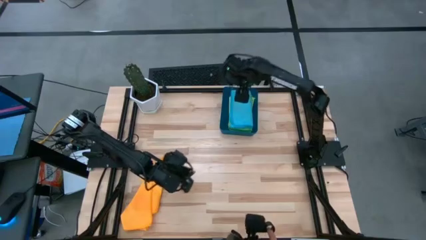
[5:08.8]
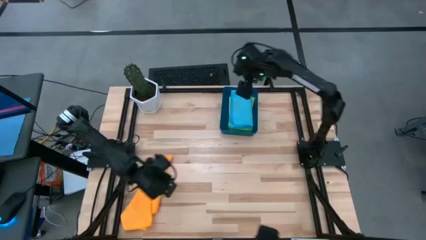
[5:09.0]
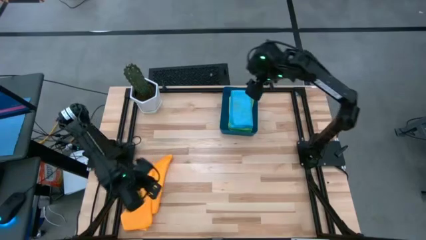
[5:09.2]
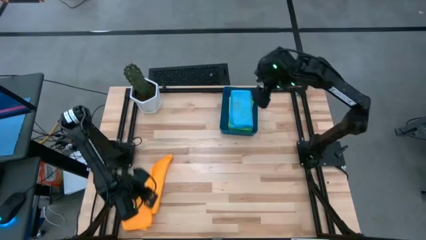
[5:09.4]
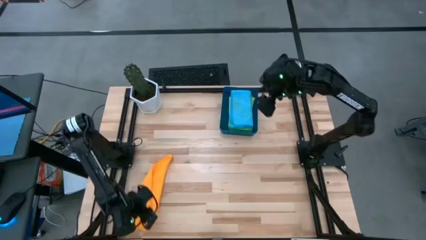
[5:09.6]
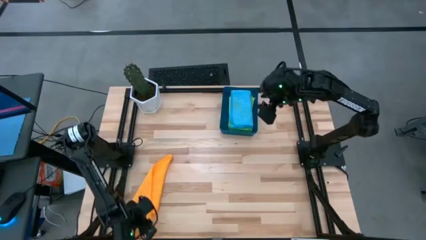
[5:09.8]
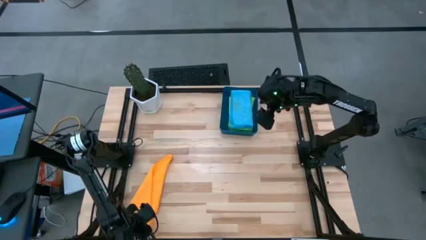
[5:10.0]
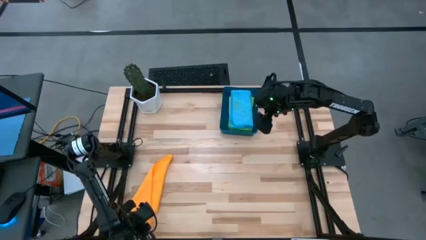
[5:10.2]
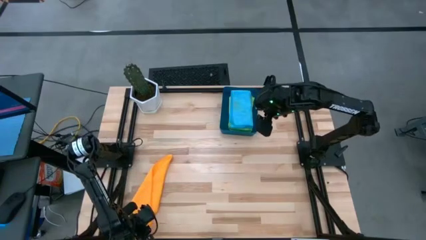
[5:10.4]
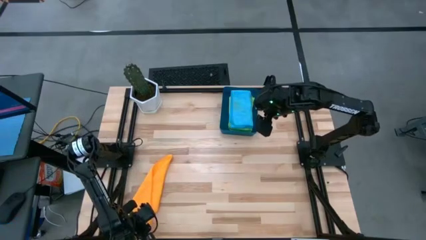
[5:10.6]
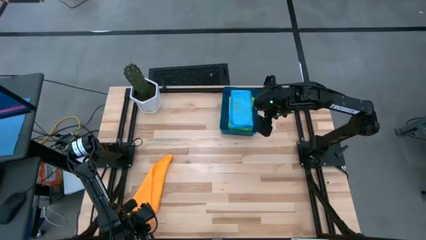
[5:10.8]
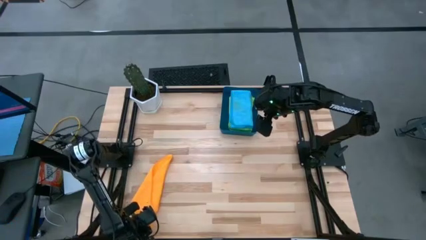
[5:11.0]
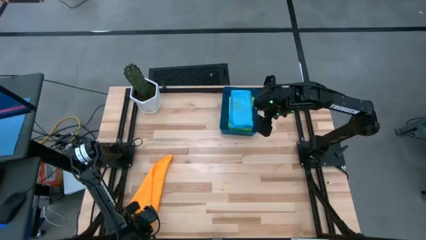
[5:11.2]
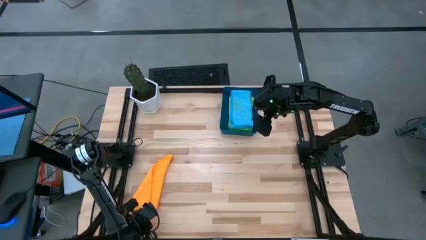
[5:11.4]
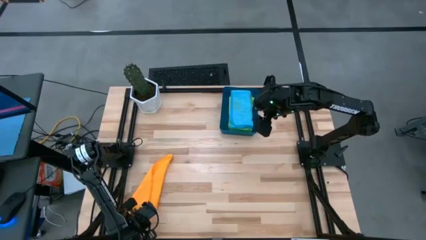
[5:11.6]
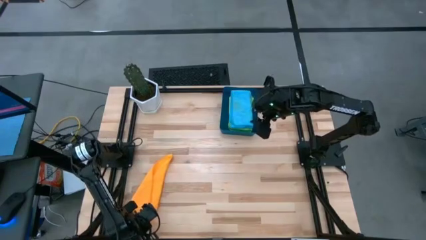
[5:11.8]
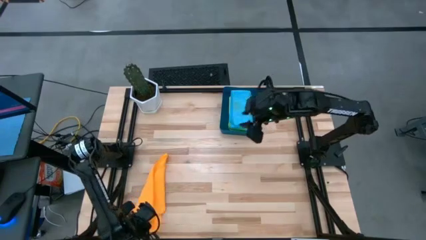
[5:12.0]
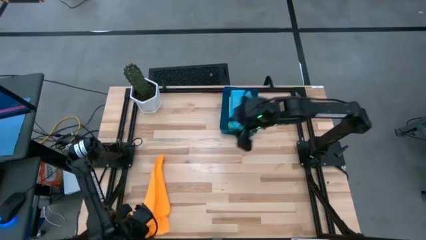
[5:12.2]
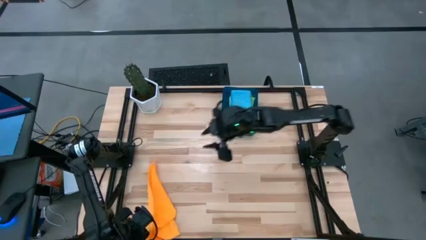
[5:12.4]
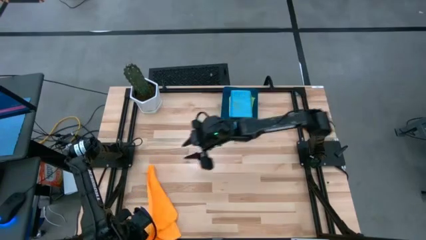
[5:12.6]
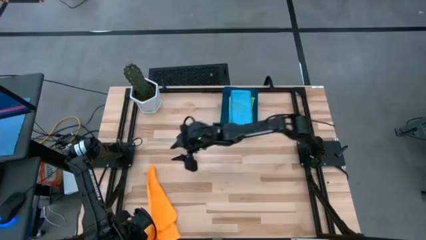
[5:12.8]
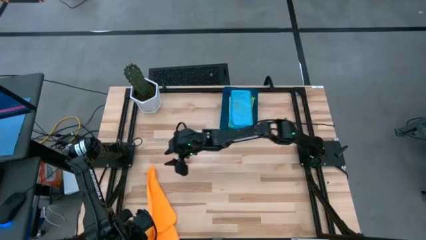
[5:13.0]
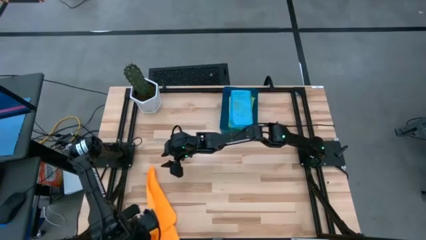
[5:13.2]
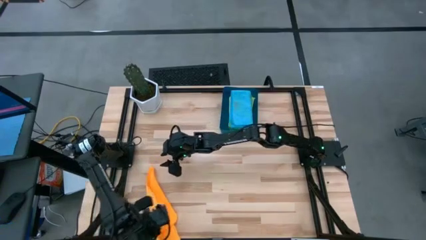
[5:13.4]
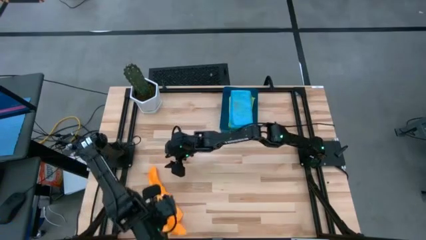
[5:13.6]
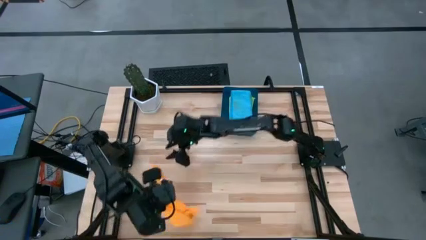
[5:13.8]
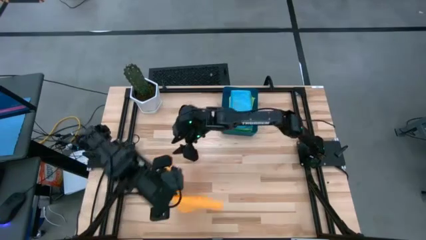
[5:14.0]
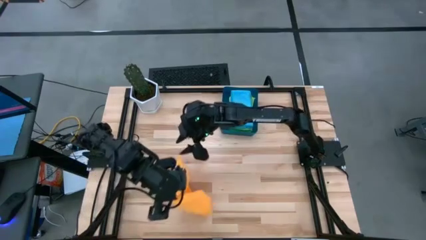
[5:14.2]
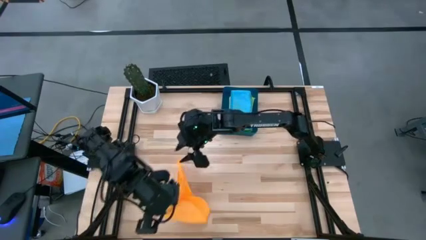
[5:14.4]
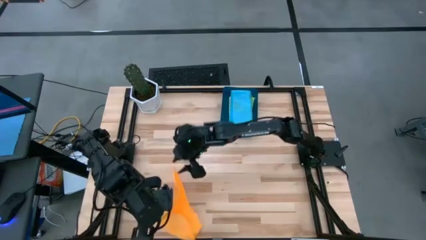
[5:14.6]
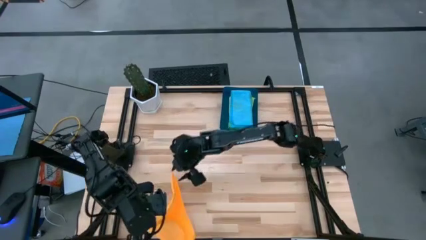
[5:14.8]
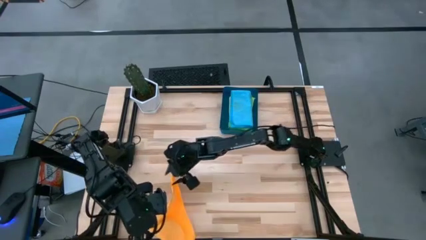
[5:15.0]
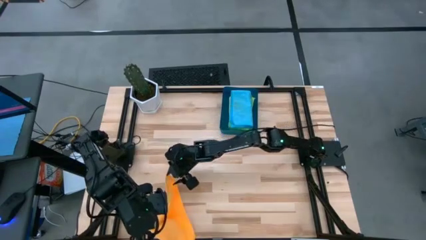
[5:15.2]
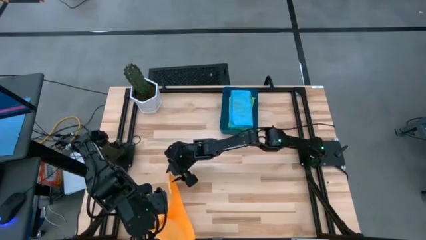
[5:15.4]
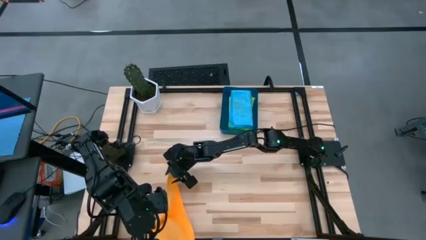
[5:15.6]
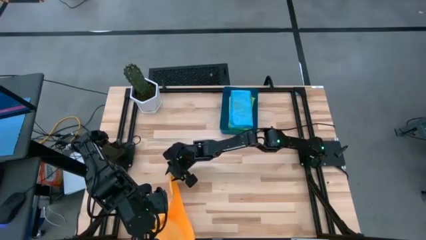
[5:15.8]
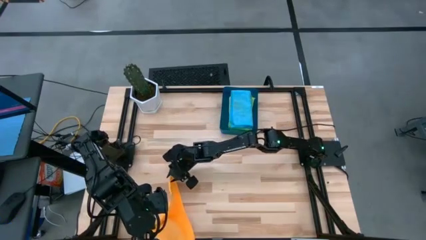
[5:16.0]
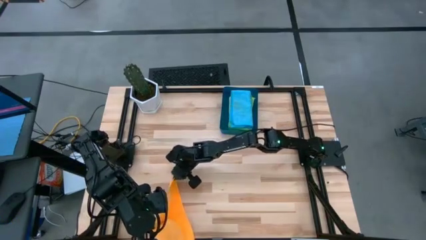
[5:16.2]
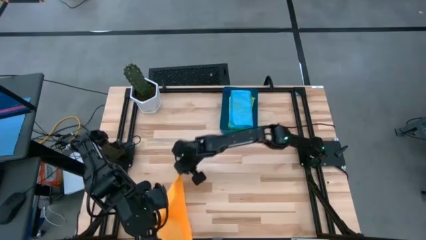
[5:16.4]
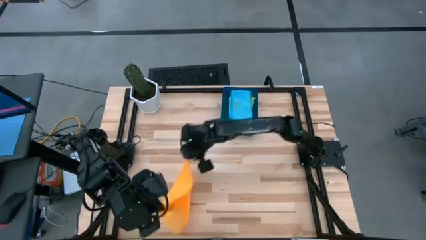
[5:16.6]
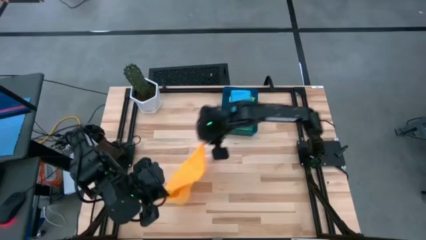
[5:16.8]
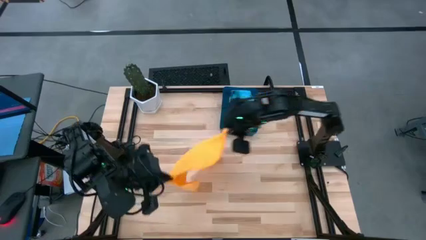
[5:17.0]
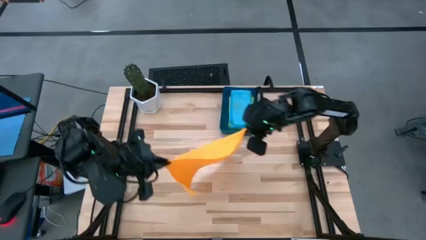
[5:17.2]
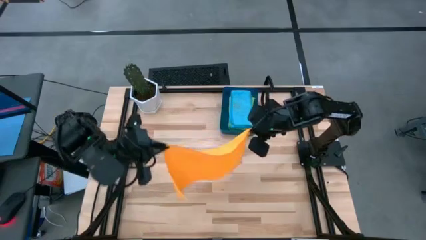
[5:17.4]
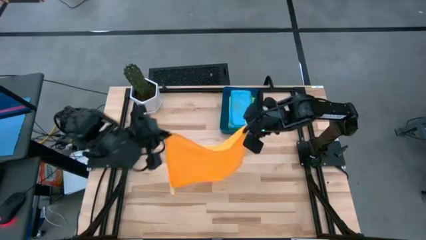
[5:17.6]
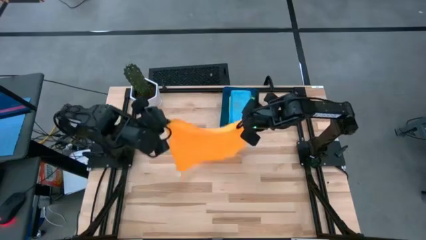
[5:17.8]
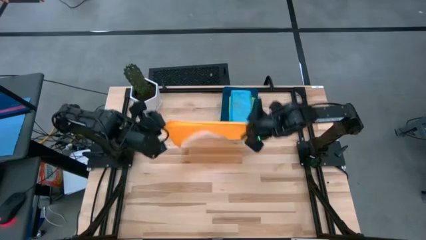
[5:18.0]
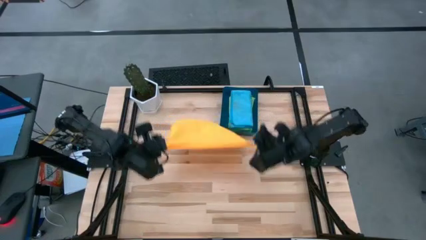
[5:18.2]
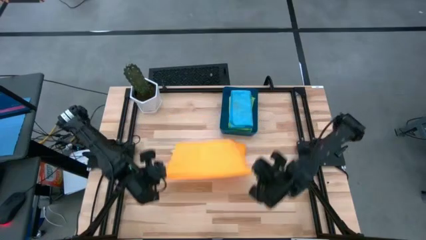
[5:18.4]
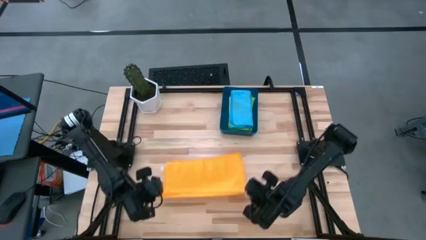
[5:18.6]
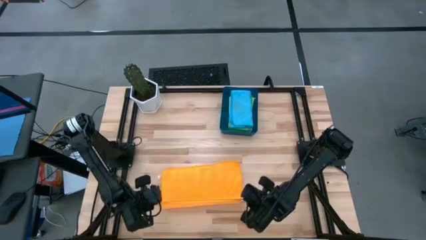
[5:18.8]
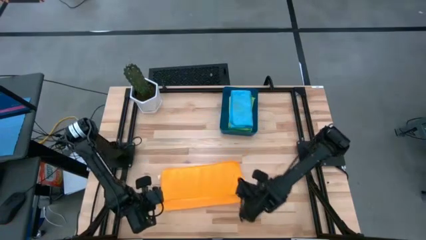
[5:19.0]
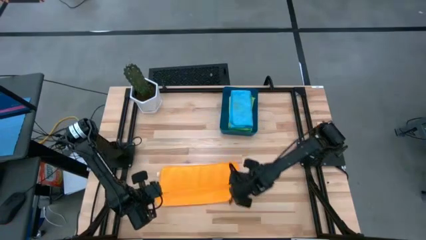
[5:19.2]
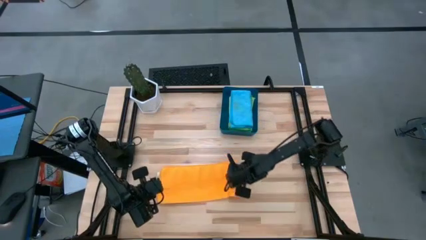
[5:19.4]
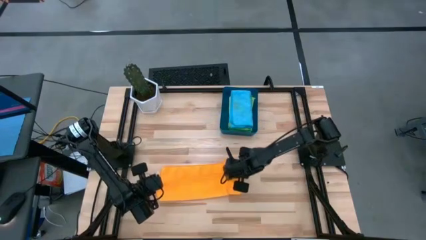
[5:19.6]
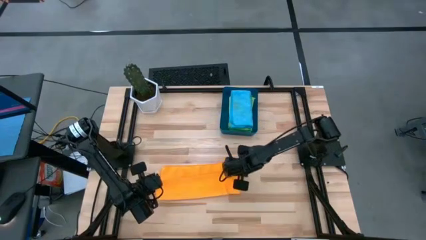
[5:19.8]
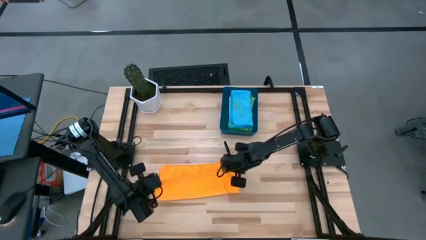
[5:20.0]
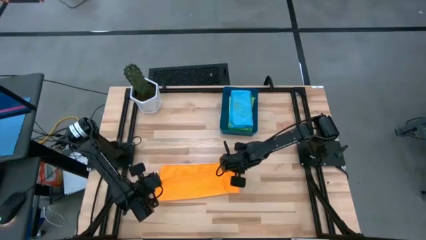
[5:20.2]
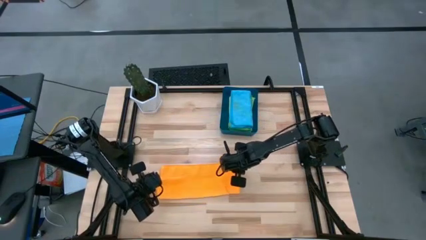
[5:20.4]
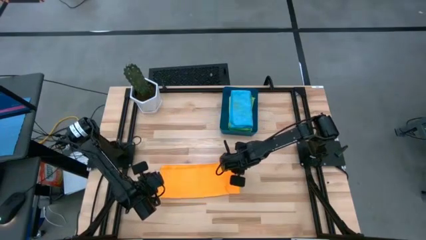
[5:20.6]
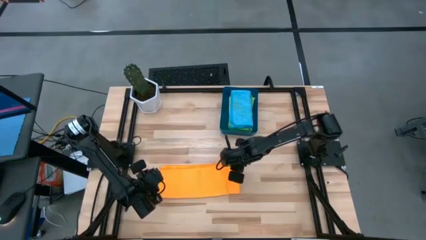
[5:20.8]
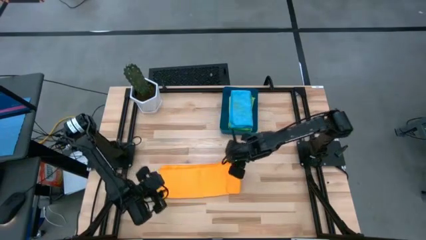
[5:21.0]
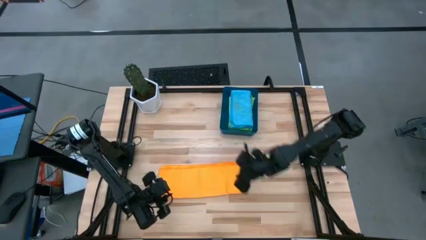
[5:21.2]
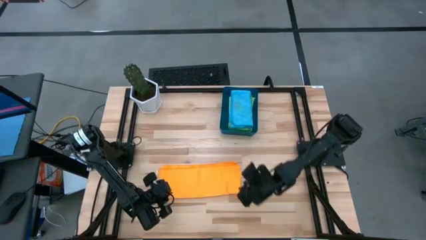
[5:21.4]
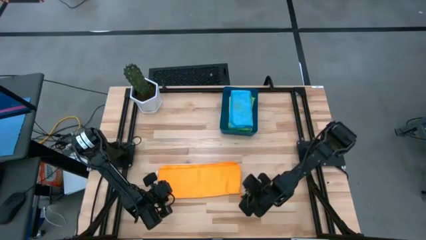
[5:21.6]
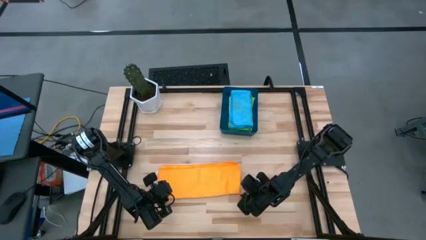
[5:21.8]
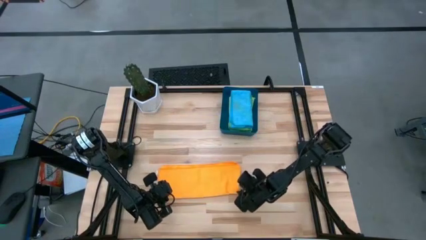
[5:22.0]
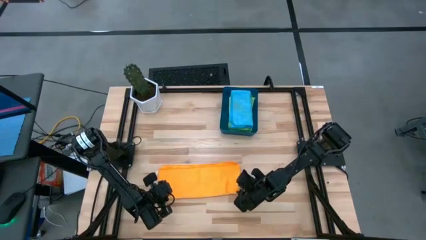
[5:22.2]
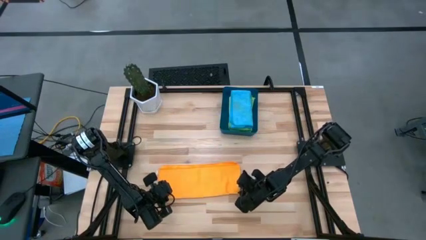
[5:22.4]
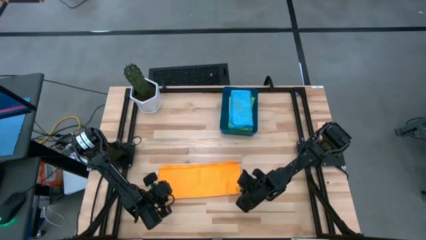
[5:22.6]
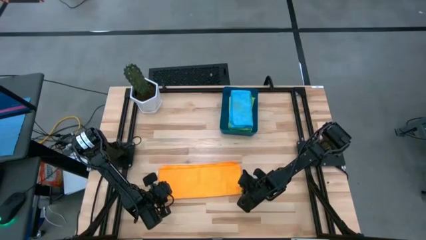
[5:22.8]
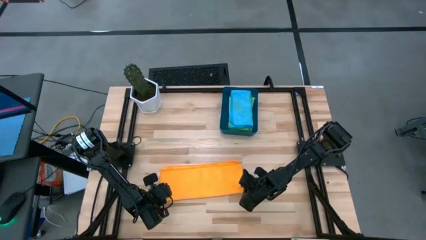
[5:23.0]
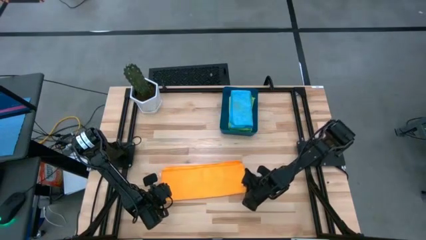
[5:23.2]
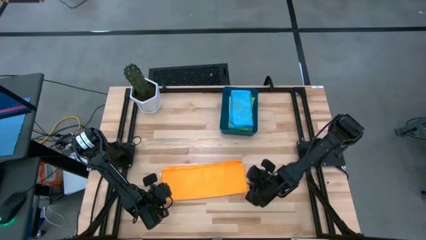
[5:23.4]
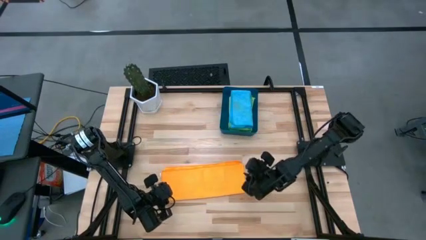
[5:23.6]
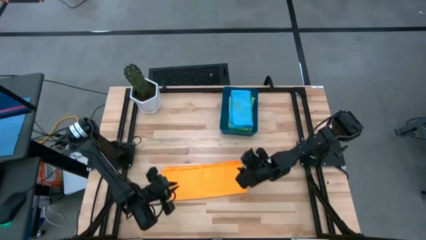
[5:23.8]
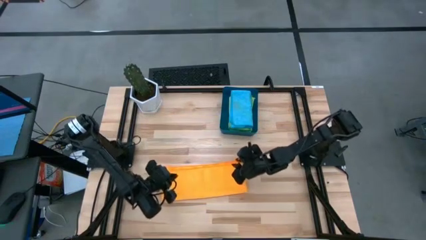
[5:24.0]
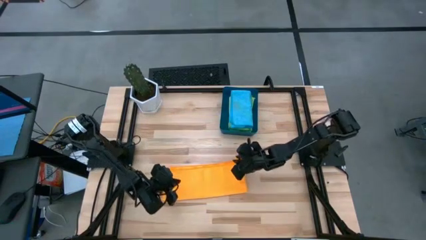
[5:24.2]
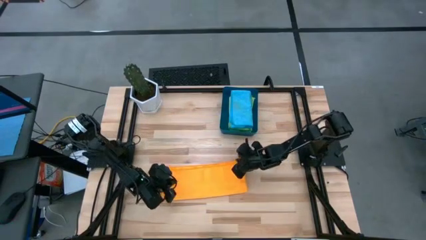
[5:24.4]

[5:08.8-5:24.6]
Task: Fold microfiber towels
Fold the orange towel
